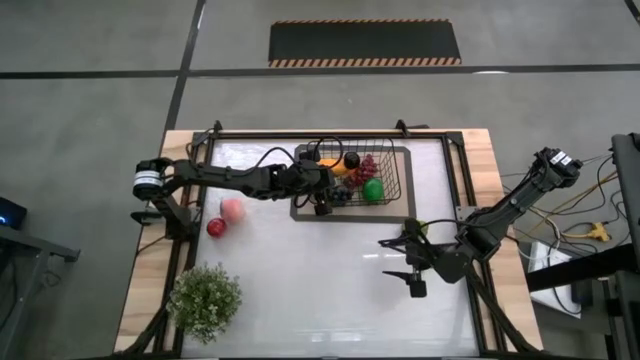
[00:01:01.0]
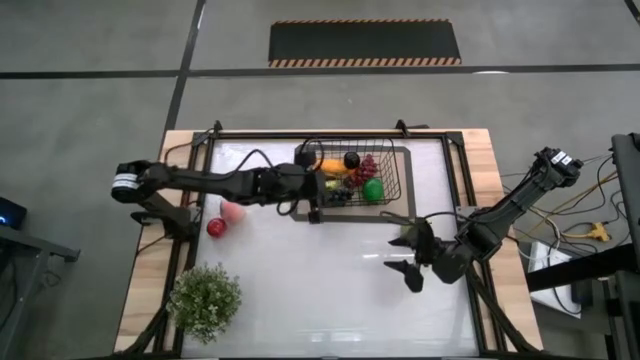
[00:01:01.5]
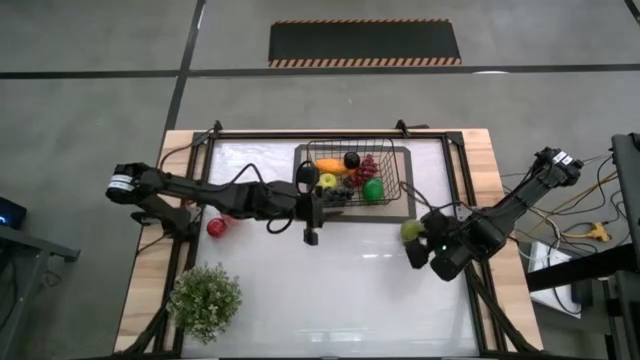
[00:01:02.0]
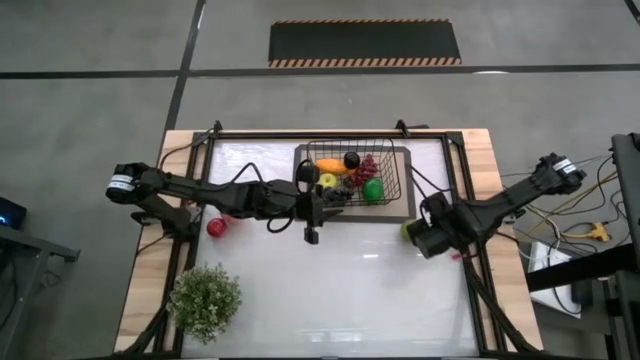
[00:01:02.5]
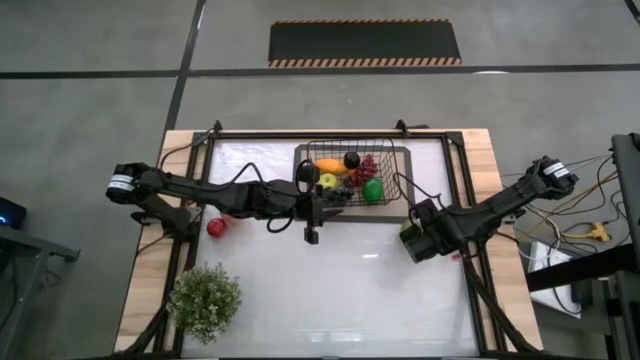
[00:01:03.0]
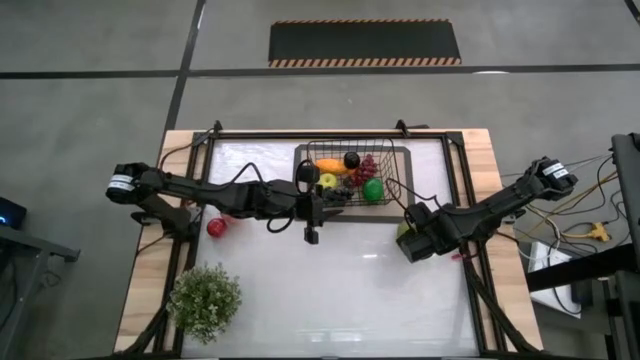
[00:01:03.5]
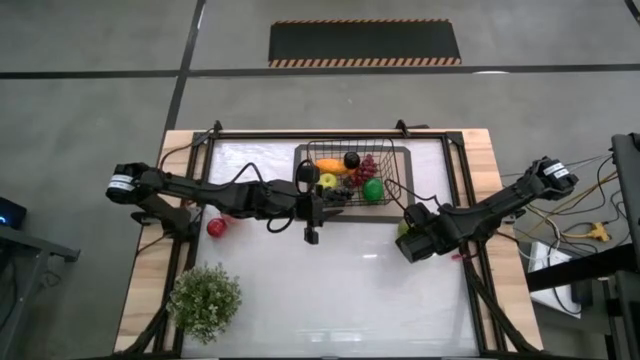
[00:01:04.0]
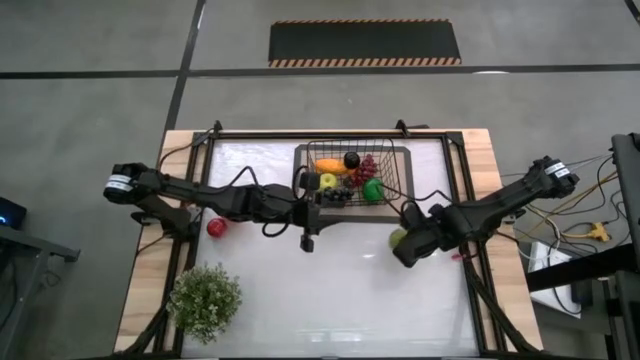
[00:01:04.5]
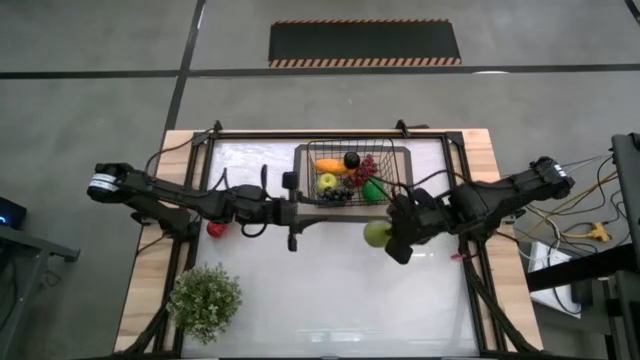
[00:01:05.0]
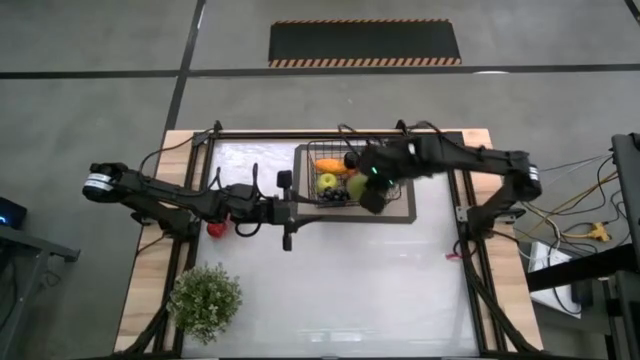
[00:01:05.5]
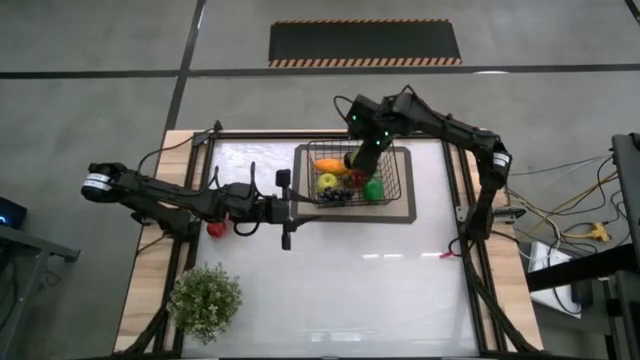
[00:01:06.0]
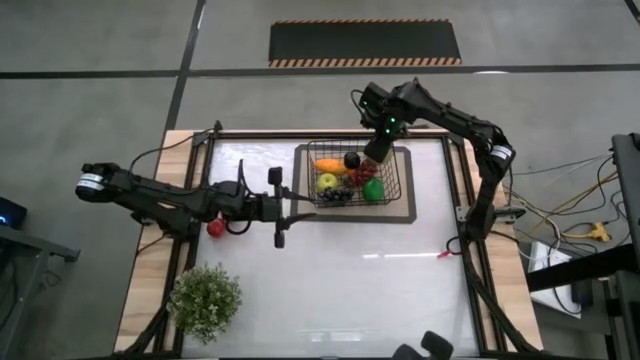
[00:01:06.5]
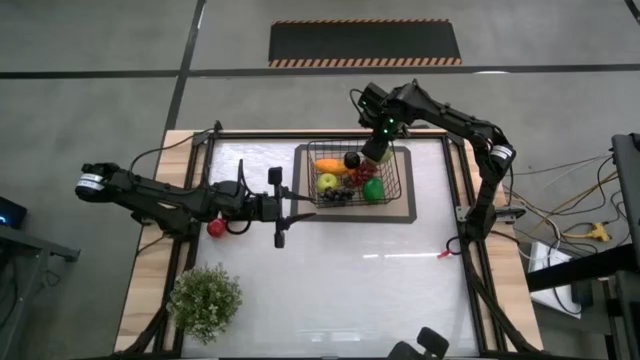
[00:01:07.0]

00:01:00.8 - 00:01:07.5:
Task: Build produce basket
Put the green pear into the black wire basket

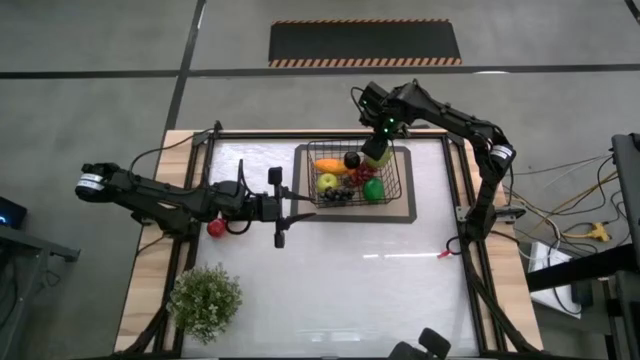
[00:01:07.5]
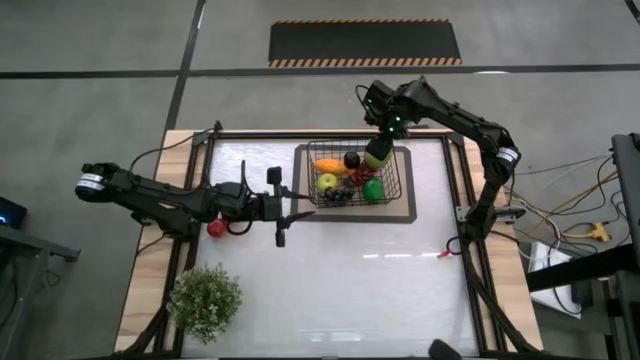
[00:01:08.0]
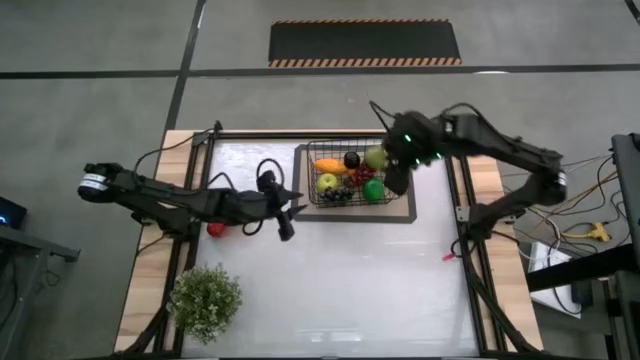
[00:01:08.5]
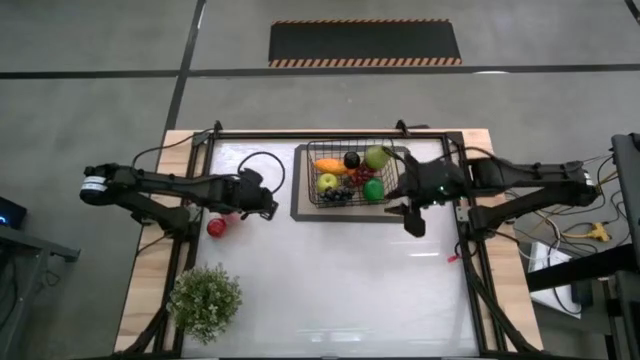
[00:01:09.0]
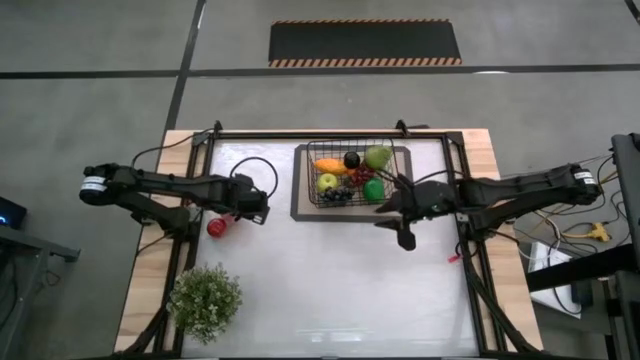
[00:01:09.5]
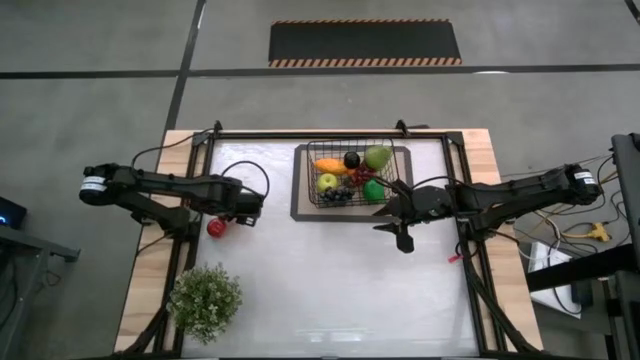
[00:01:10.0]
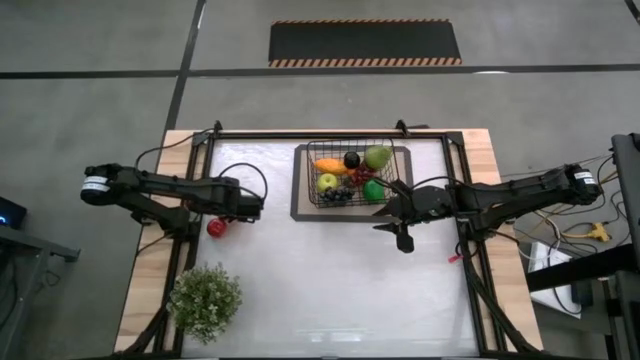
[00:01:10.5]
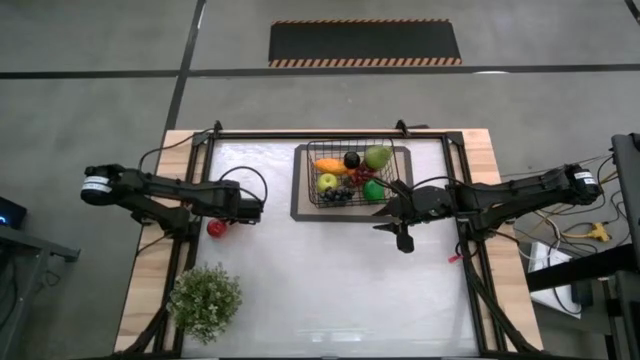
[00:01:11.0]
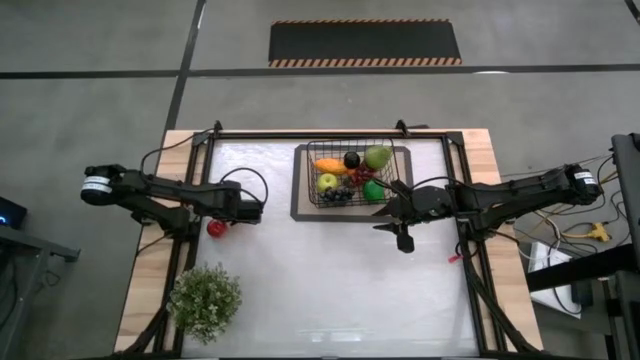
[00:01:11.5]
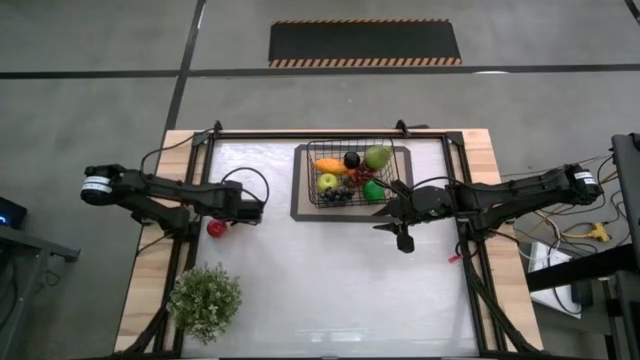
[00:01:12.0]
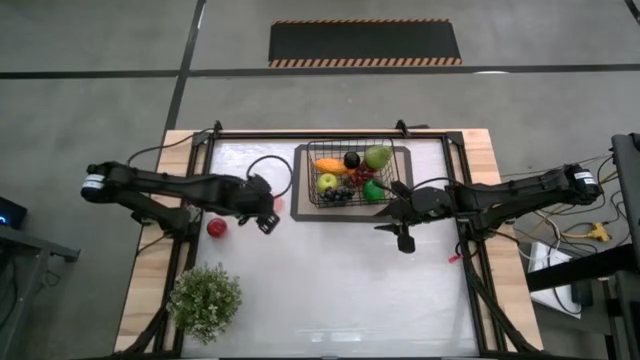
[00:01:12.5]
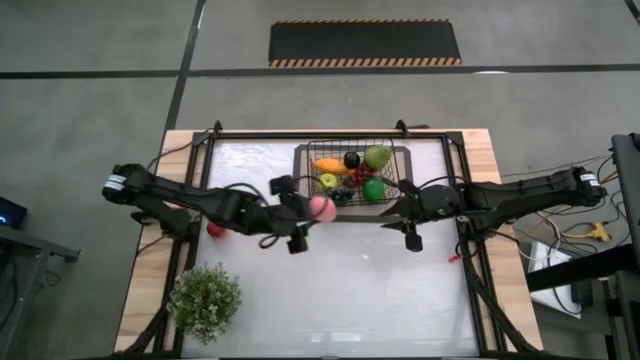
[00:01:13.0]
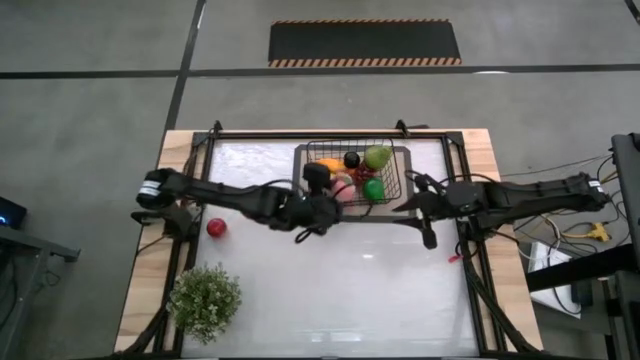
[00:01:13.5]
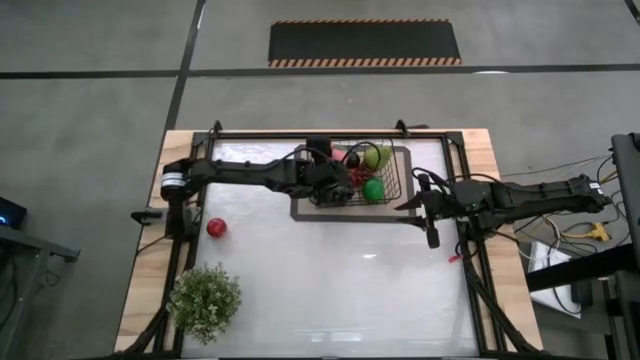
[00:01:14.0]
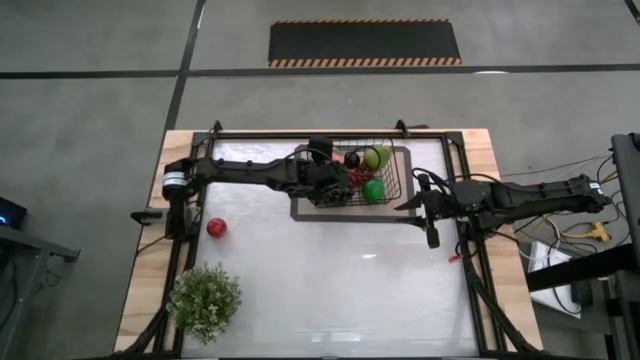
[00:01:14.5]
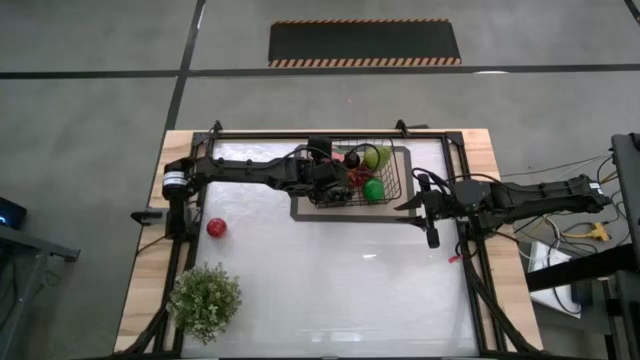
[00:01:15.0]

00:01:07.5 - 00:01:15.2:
Put the pink peach into the black wire basket

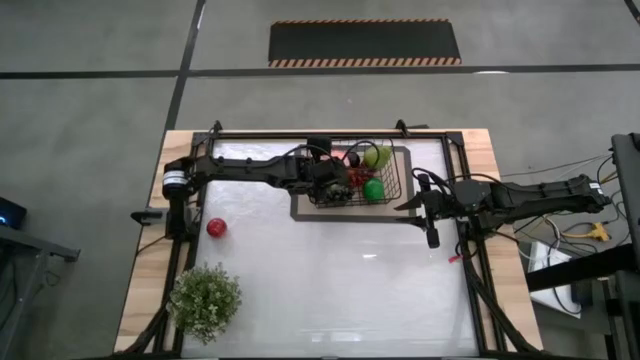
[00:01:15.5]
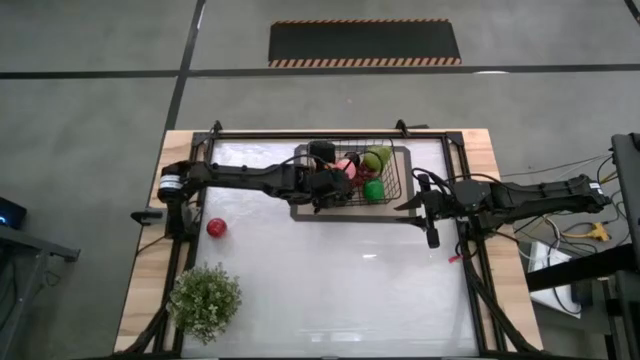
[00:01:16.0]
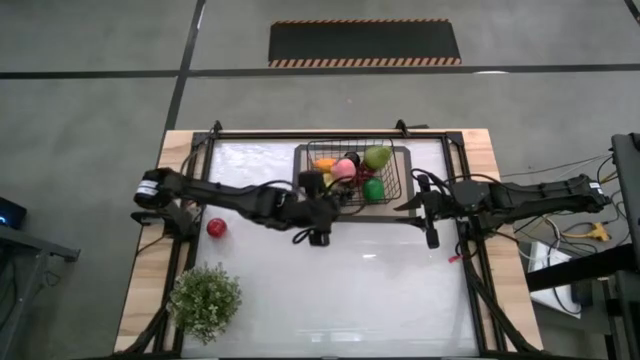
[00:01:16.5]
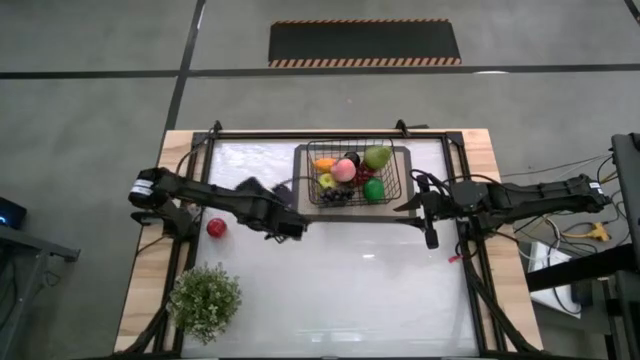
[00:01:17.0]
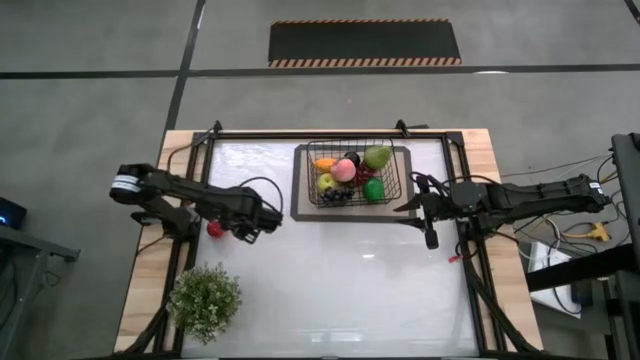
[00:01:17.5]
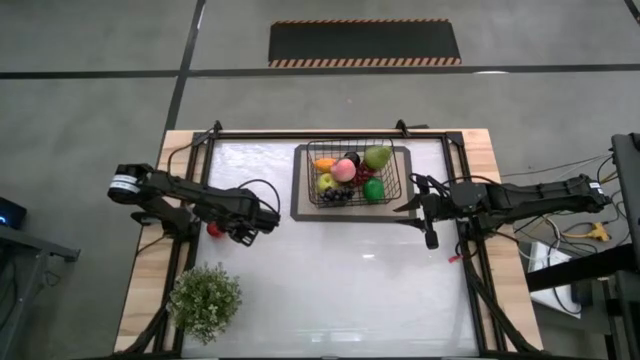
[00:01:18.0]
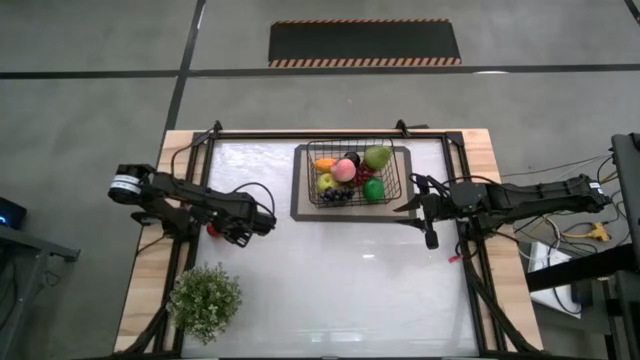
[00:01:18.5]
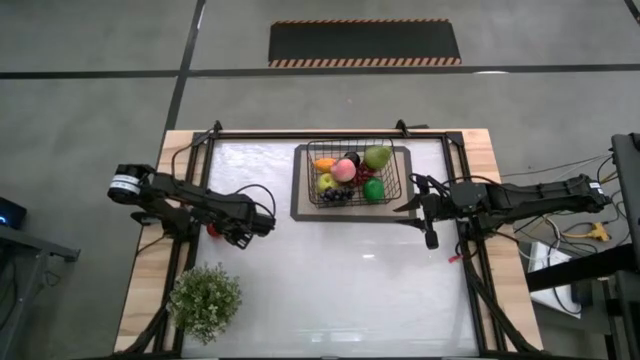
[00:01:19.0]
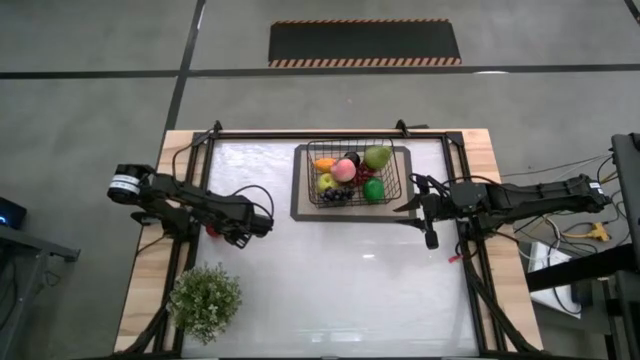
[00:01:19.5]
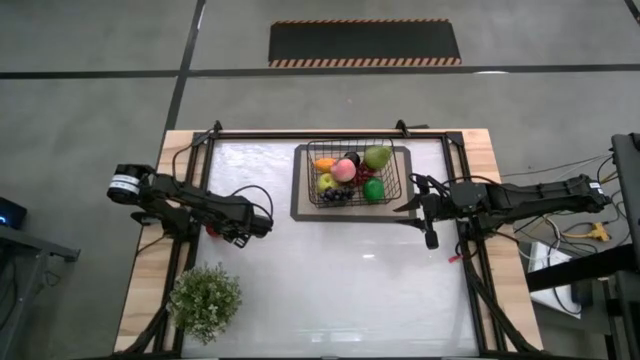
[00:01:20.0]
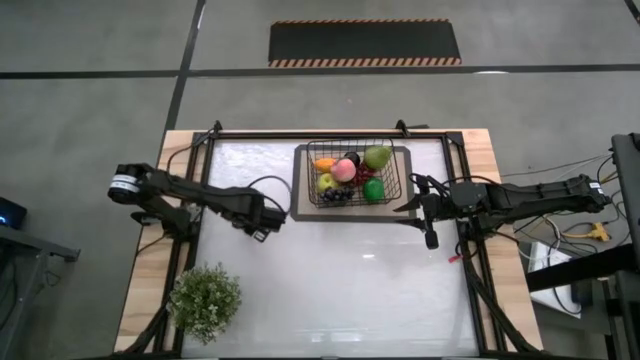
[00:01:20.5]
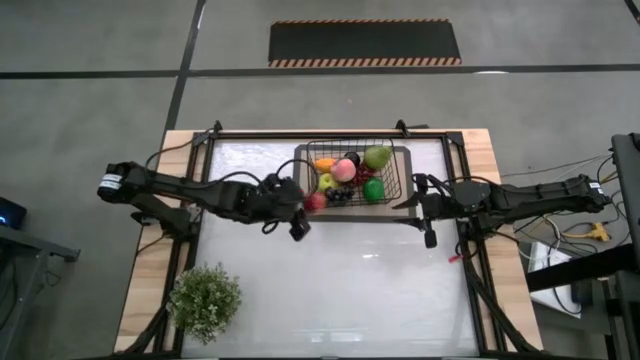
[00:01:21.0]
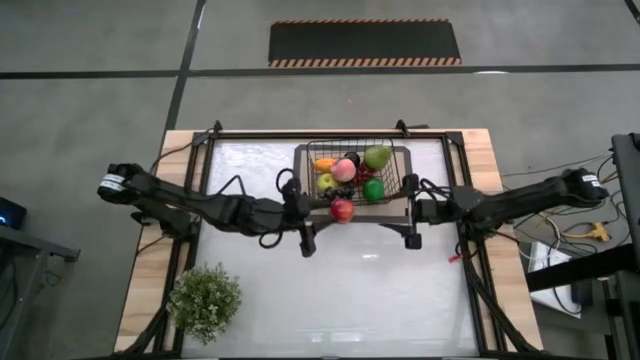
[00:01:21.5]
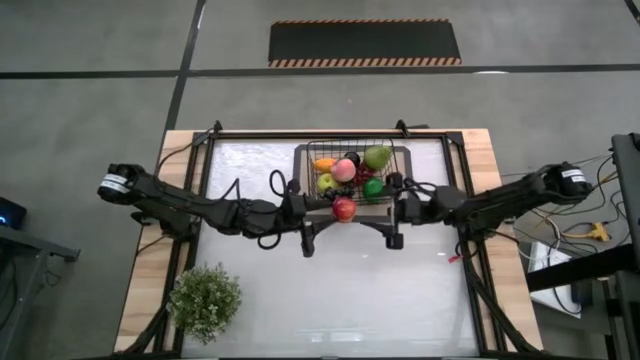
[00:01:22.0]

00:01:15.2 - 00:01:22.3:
Put the red apple into the black wire basket

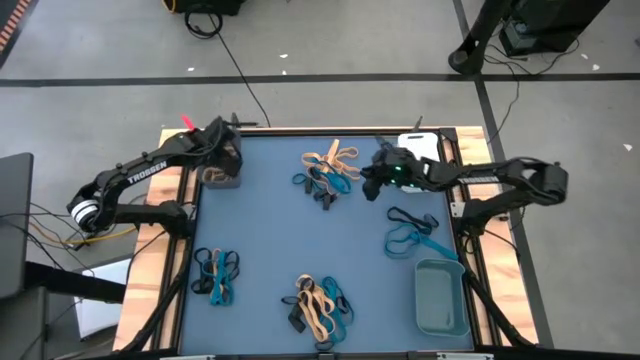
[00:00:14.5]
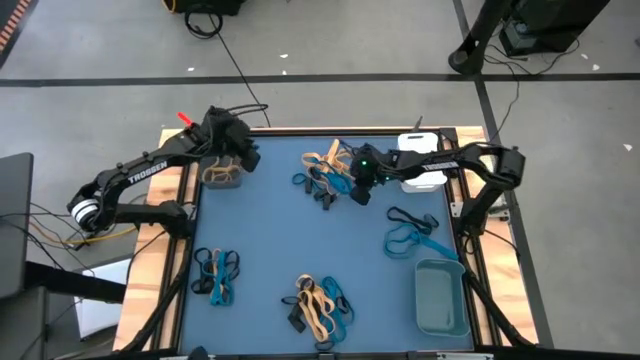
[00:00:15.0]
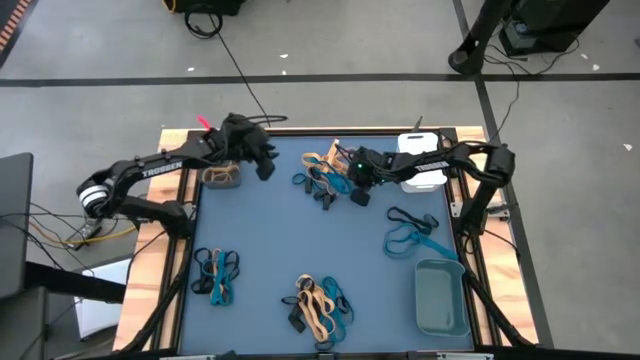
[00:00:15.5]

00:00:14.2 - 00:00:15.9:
Task: Sort rubber bands into baskets
Put the yellow rubber band into the black bin
